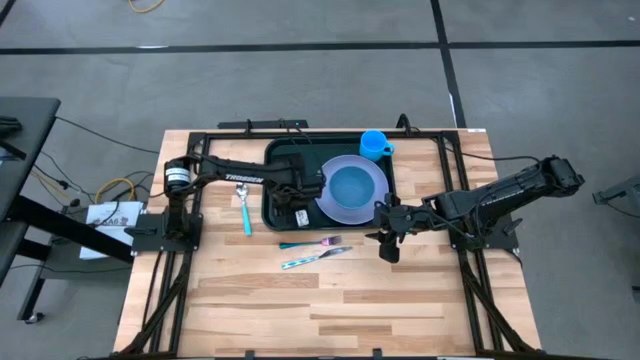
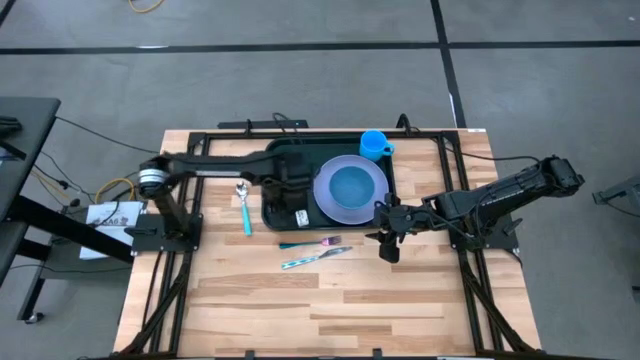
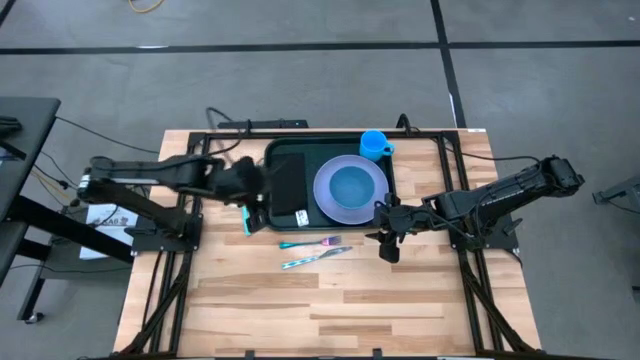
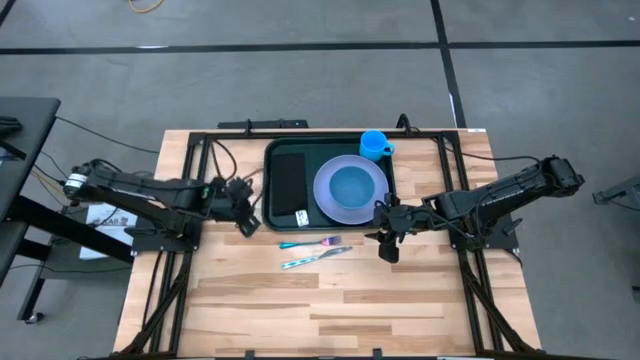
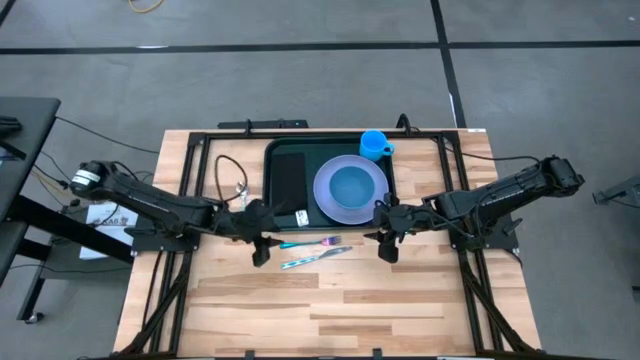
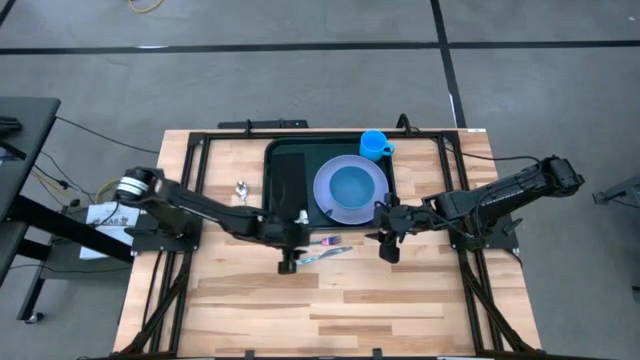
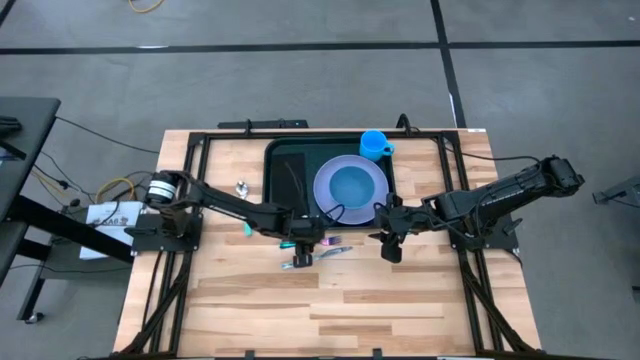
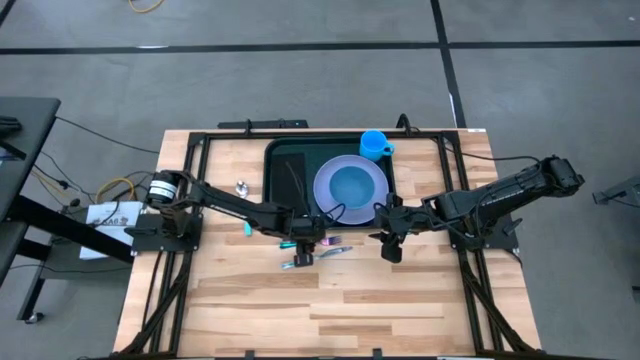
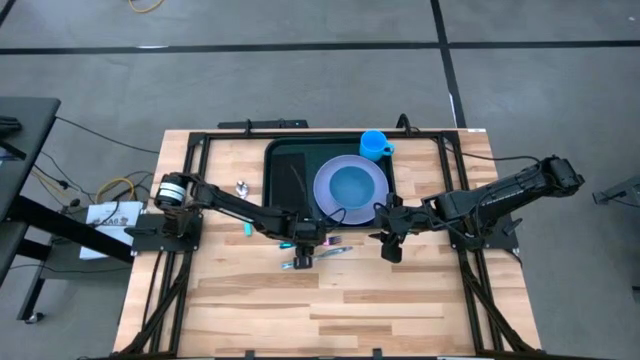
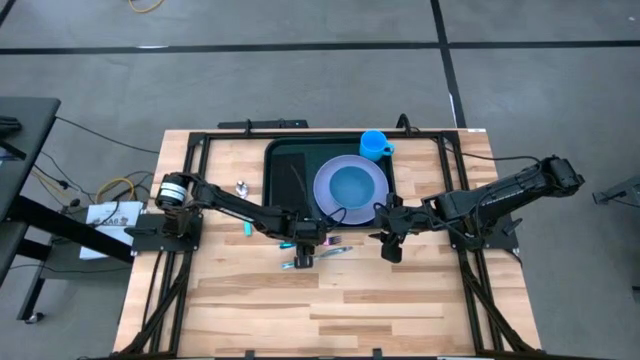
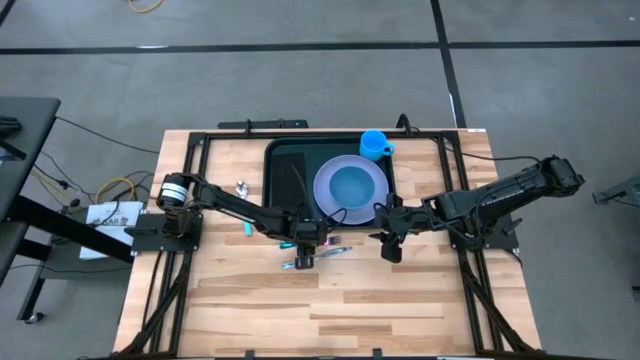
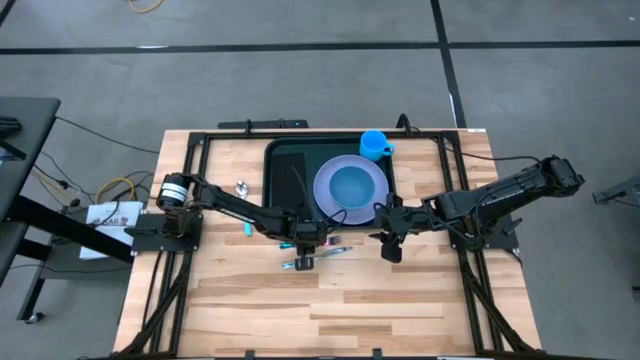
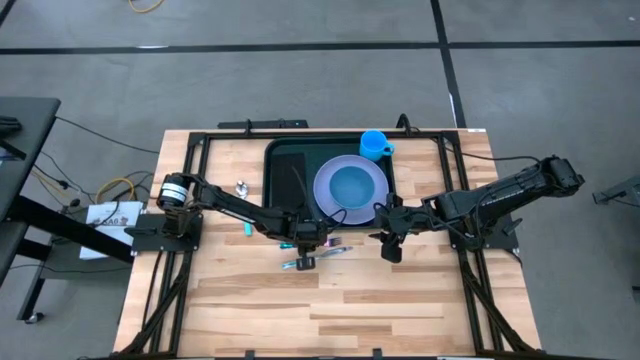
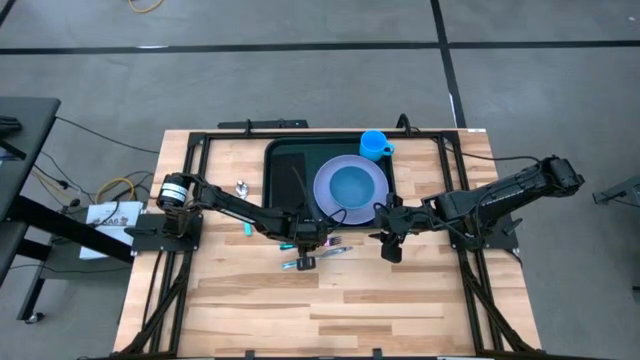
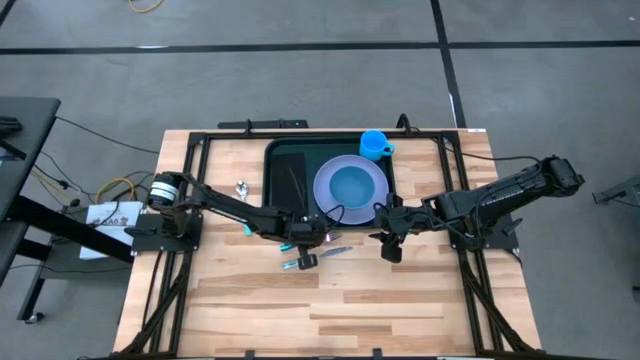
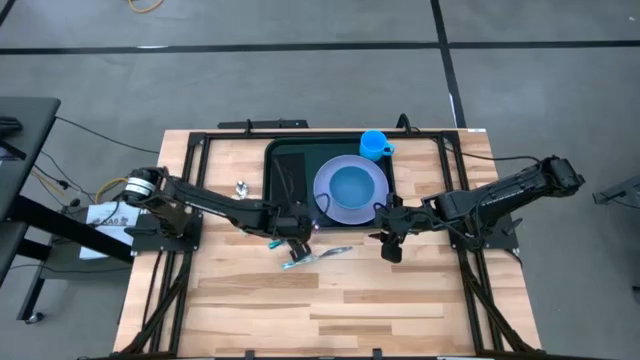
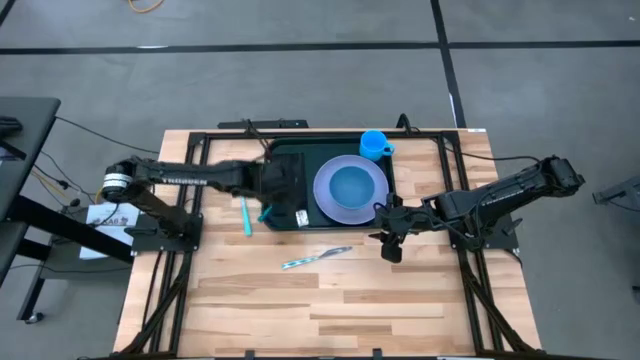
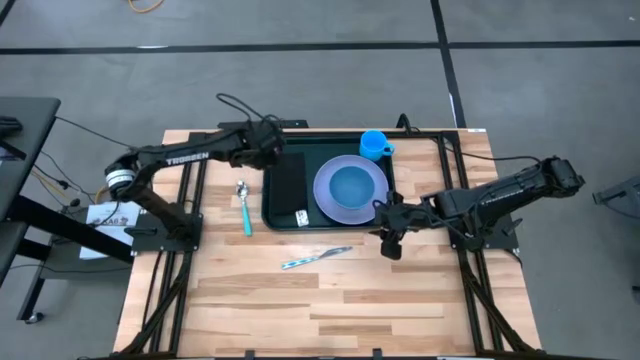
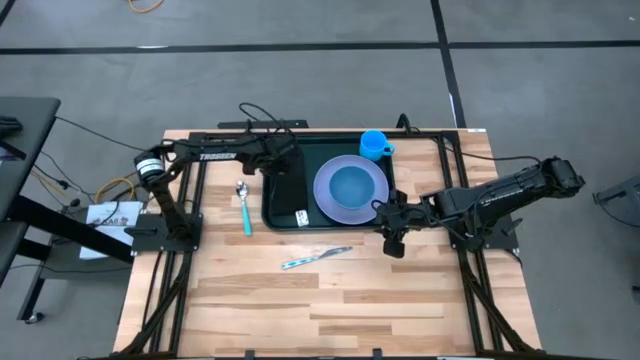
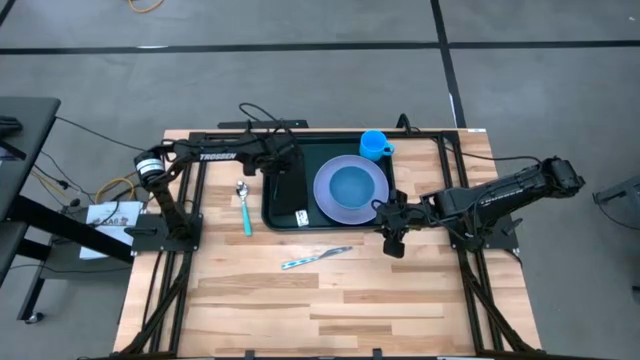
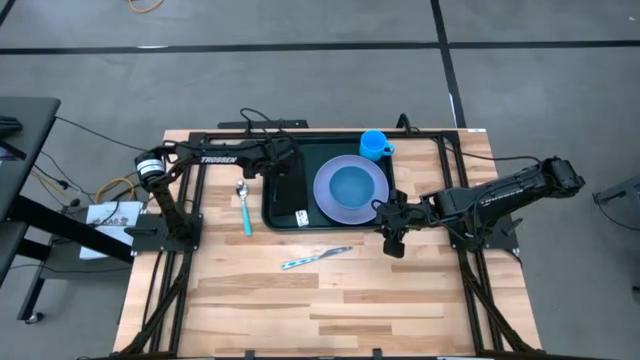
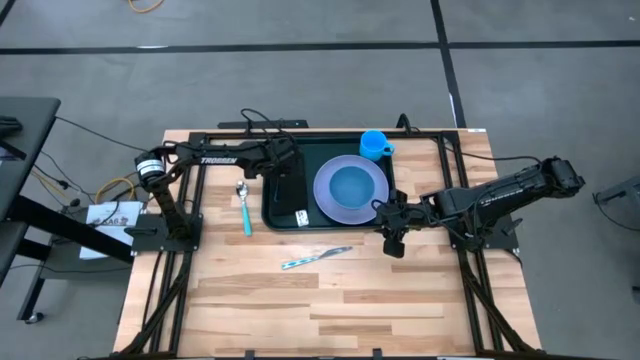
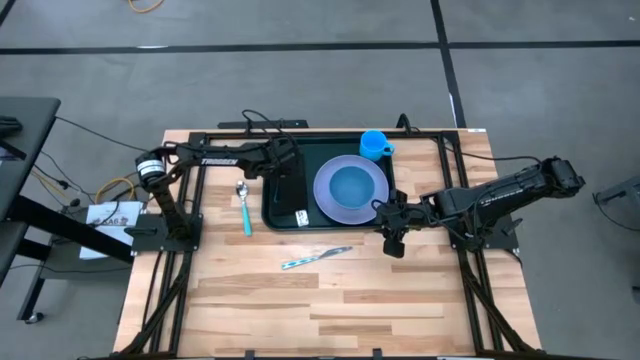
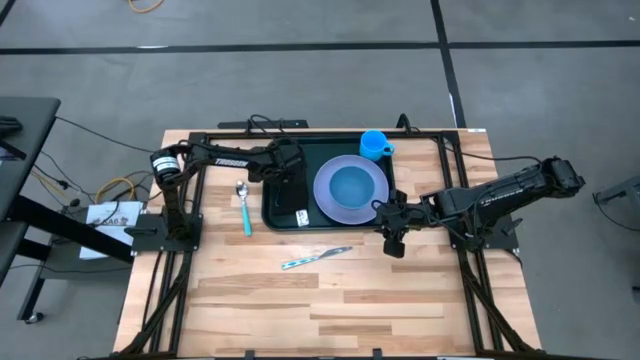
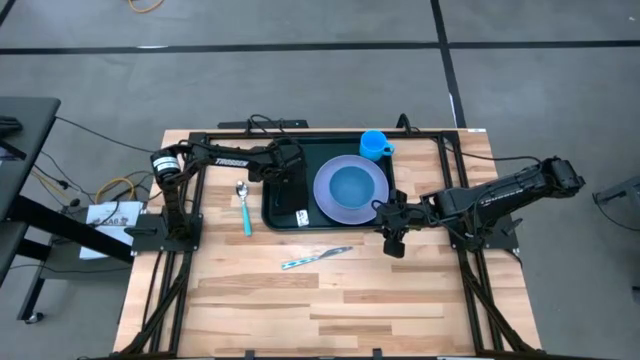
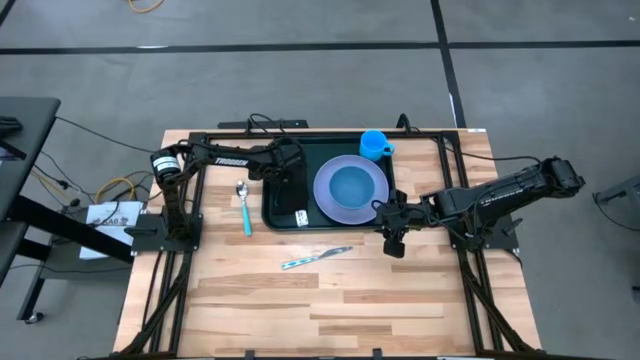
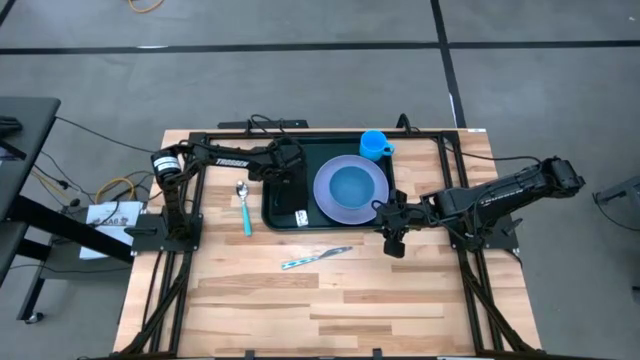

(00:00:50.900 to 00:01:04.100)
Task: Set up tray
Put the blue fork to the left of the black napkin

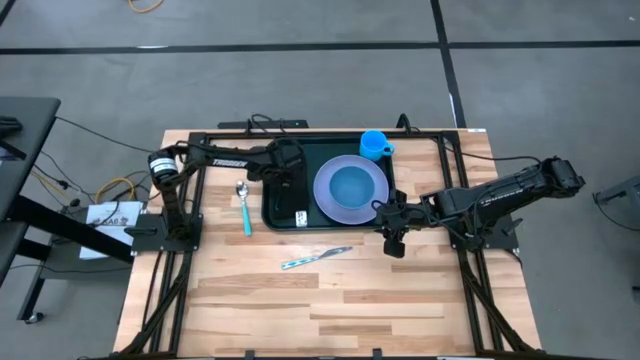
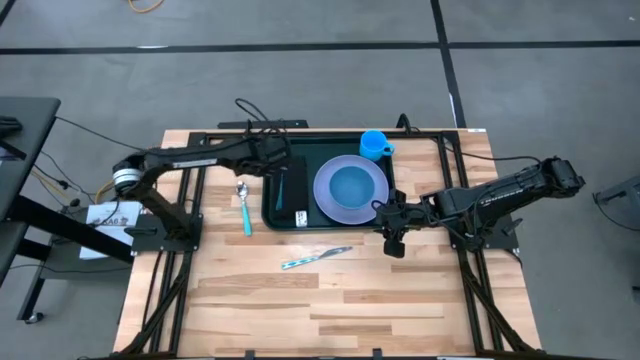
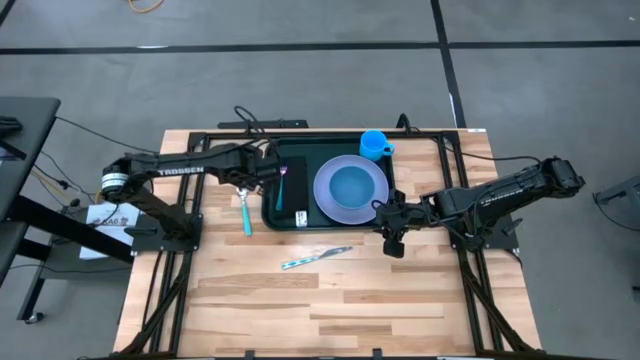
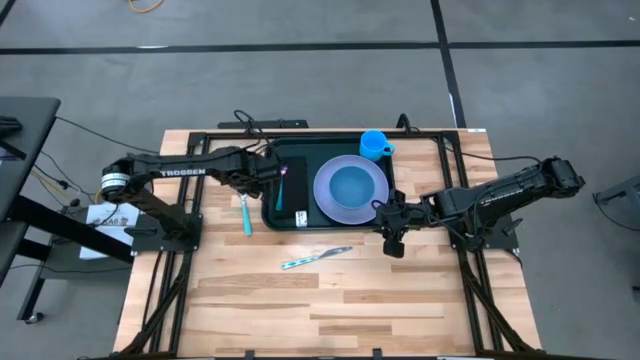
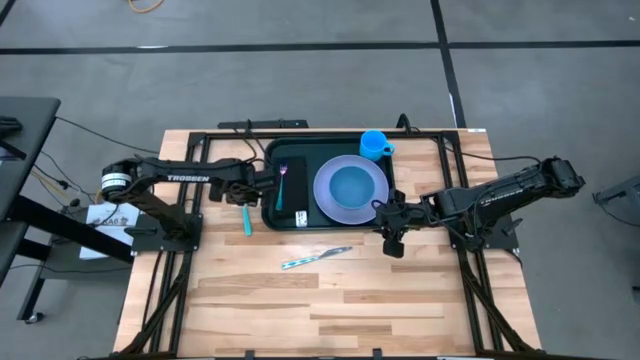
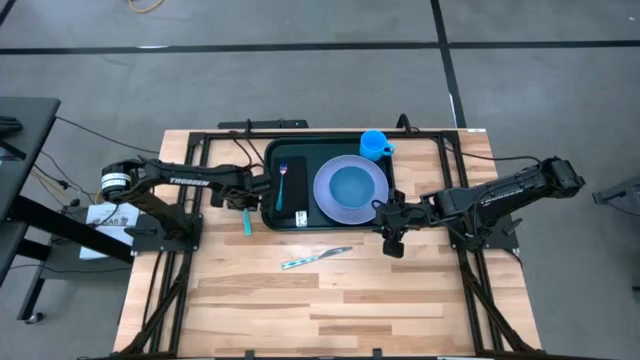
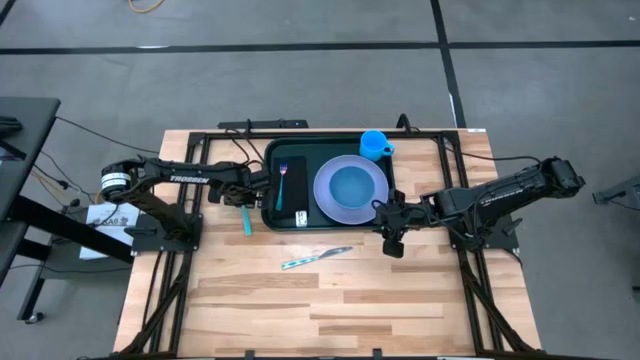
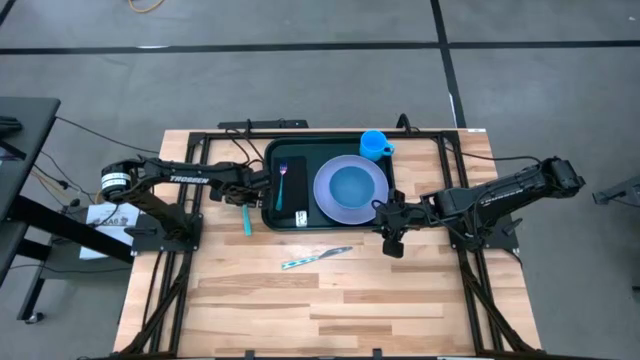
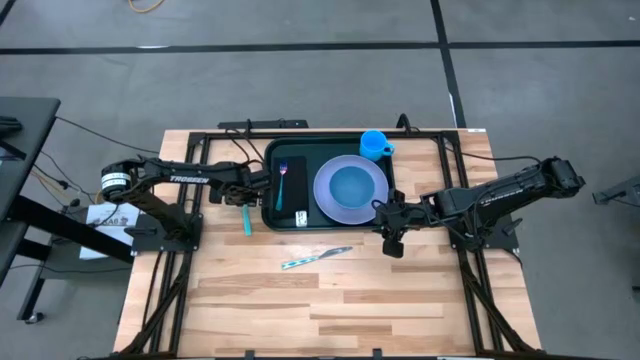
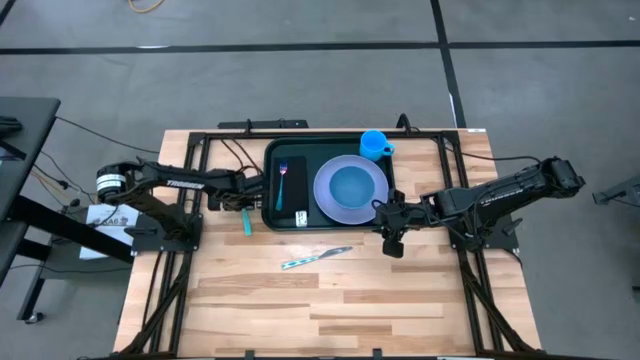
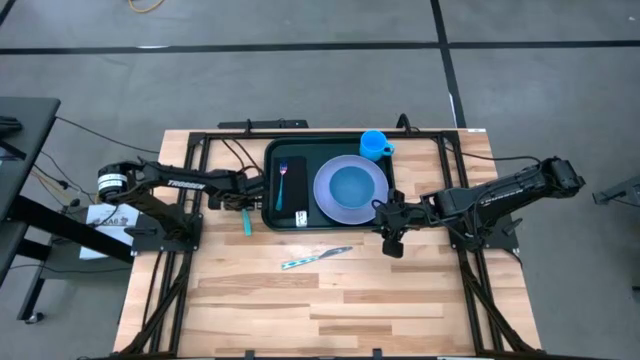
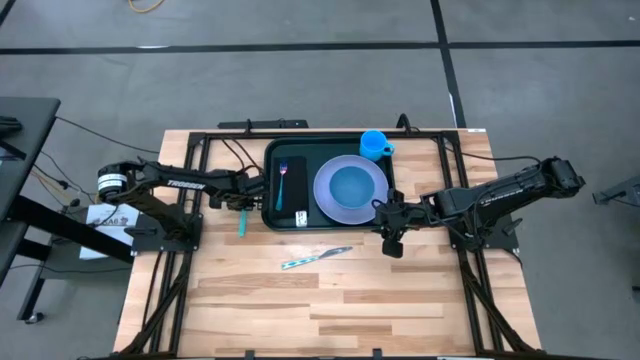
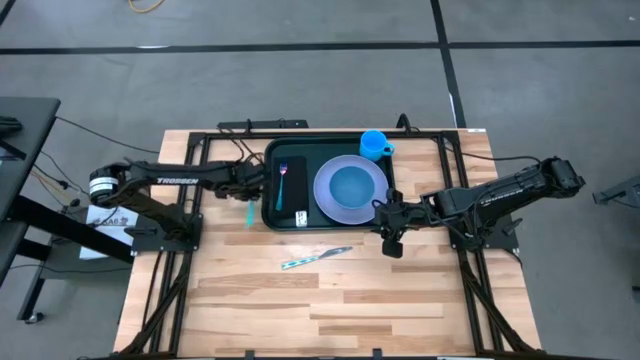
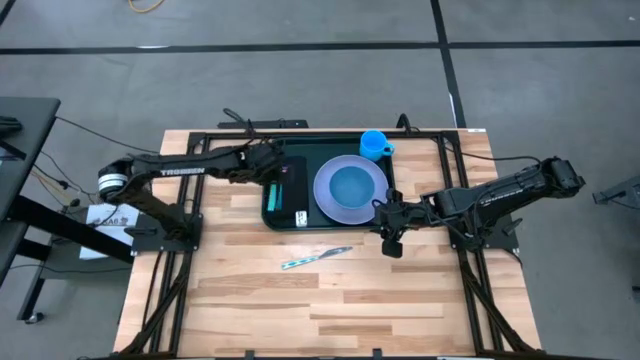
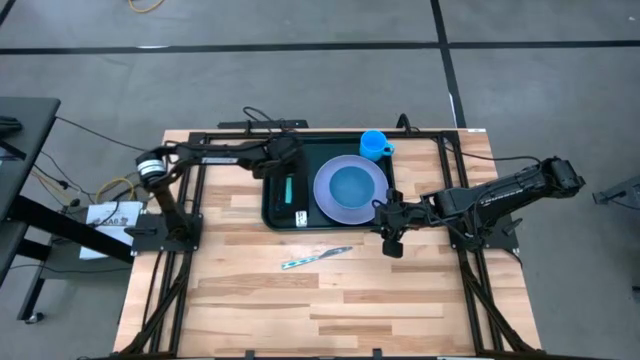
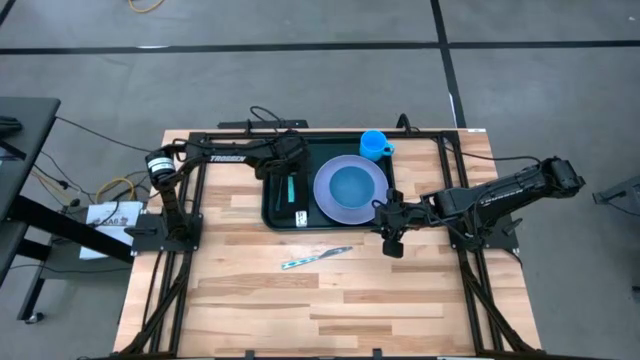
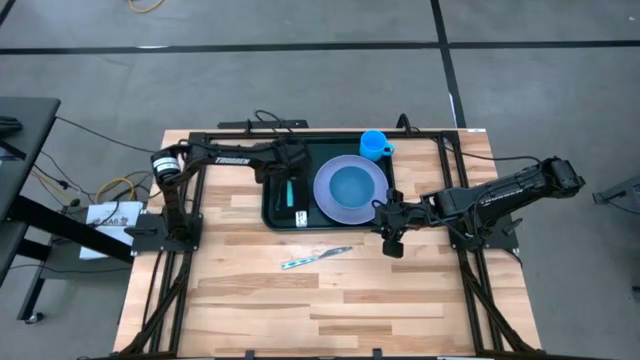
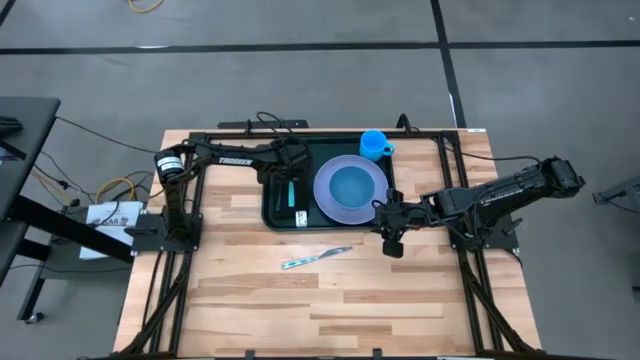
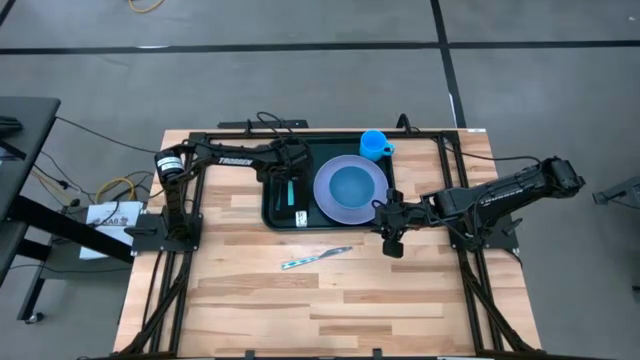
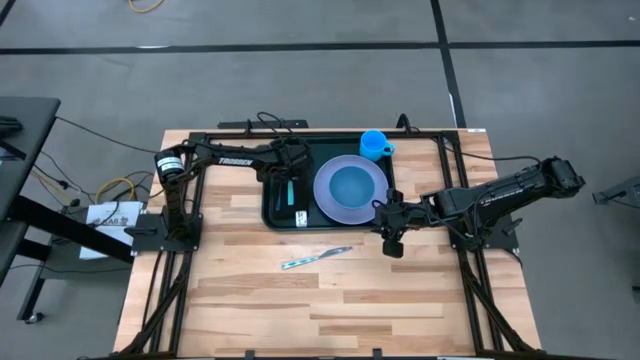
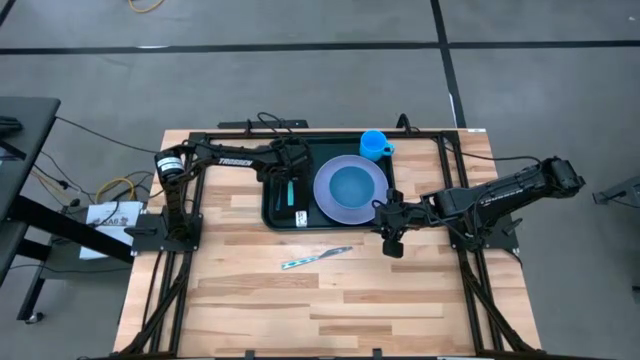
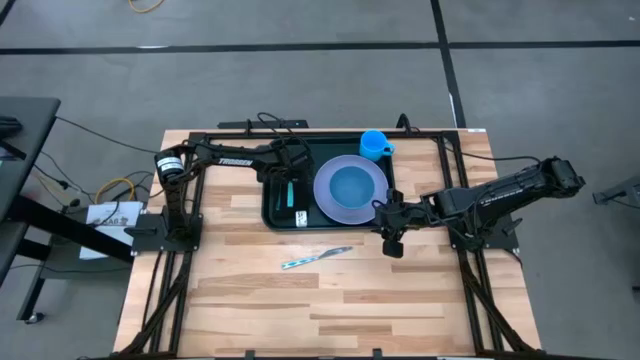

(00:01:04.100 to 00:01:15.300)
Put the light blue spoon to the right of the blue fork on the black napkin
